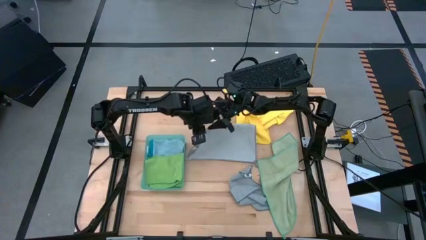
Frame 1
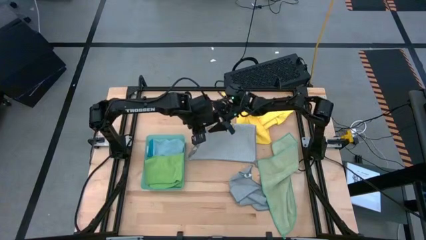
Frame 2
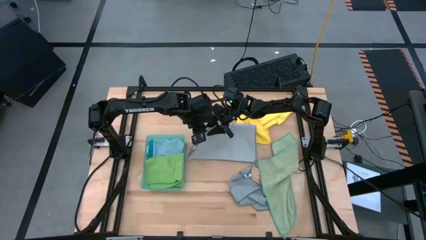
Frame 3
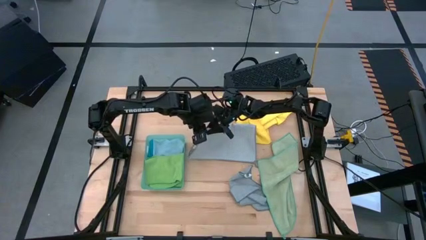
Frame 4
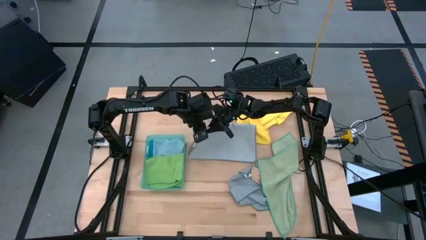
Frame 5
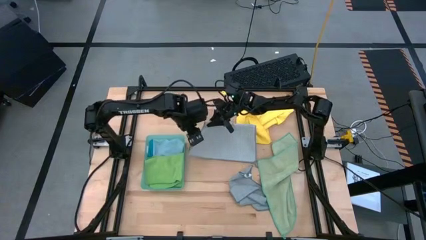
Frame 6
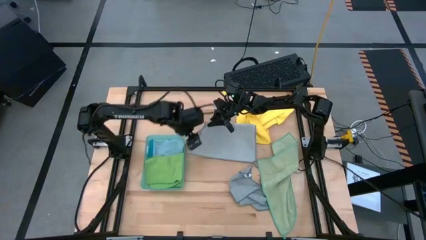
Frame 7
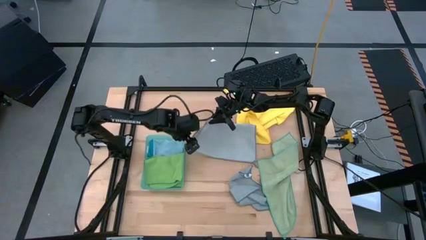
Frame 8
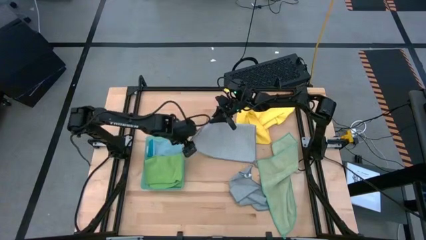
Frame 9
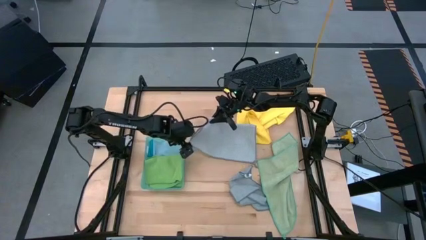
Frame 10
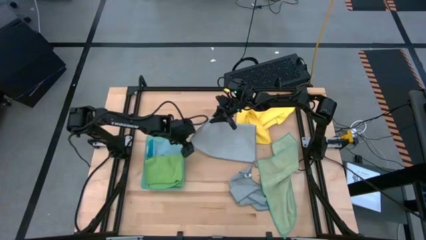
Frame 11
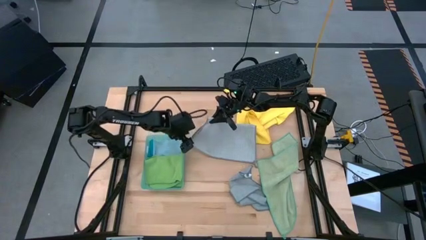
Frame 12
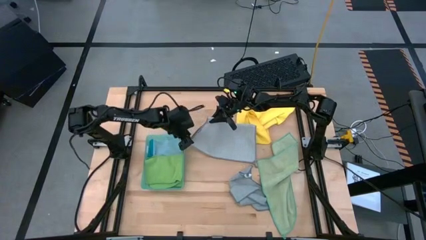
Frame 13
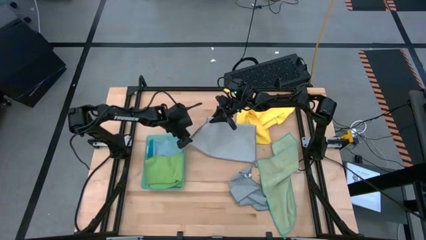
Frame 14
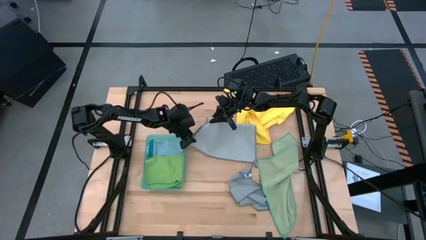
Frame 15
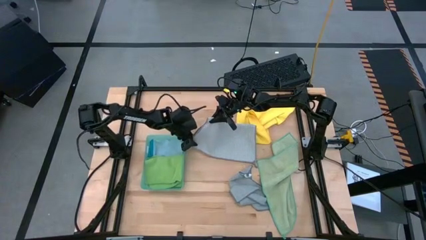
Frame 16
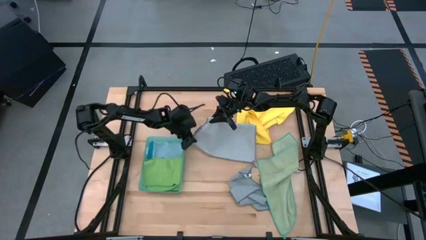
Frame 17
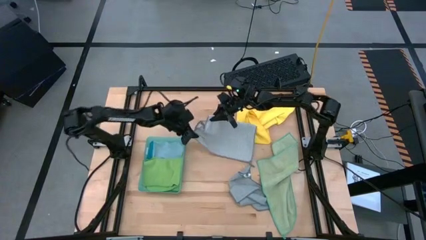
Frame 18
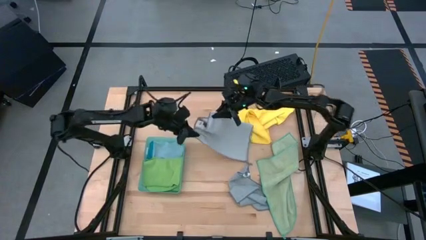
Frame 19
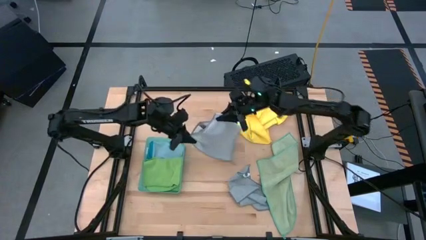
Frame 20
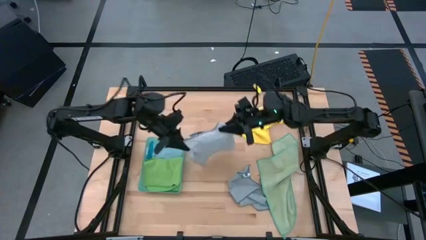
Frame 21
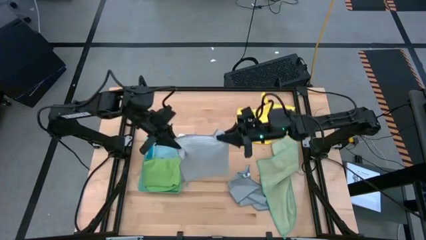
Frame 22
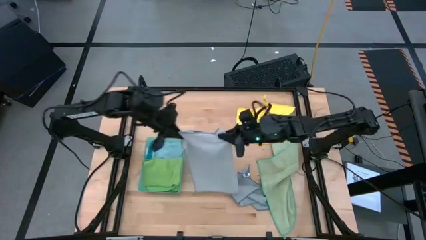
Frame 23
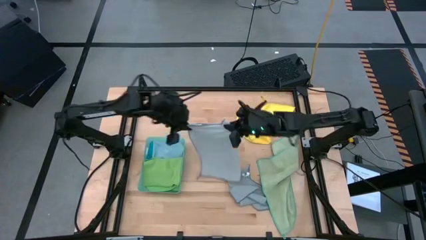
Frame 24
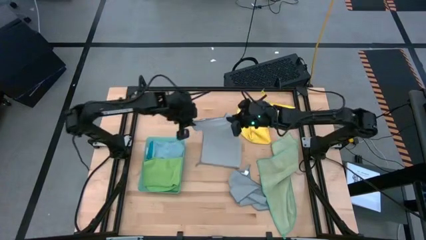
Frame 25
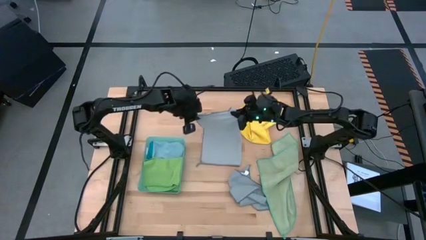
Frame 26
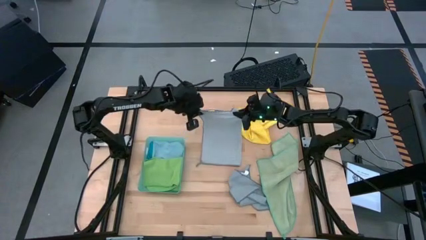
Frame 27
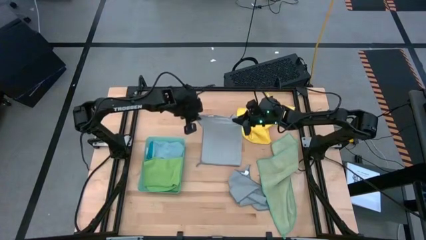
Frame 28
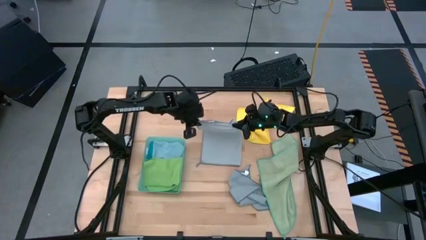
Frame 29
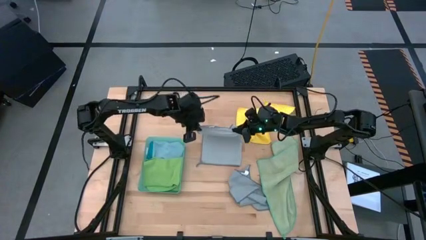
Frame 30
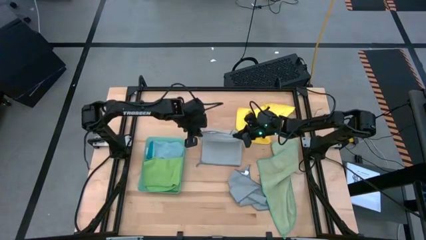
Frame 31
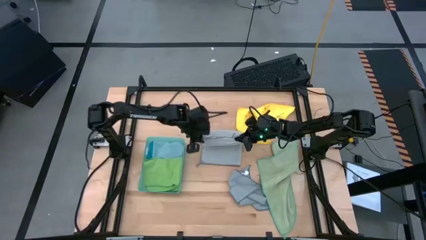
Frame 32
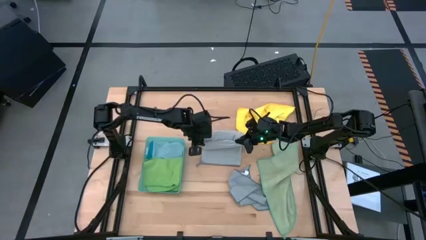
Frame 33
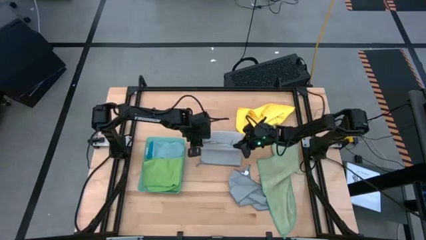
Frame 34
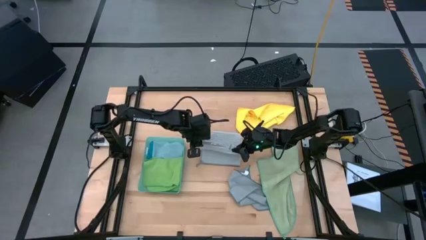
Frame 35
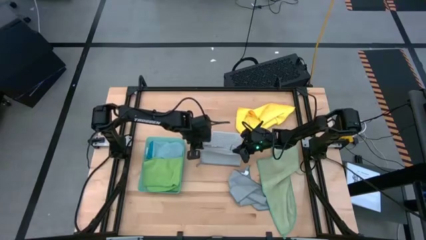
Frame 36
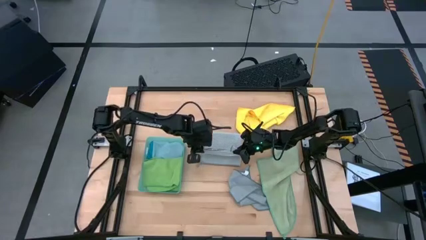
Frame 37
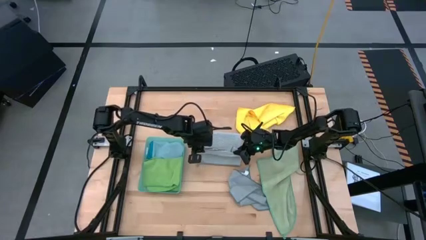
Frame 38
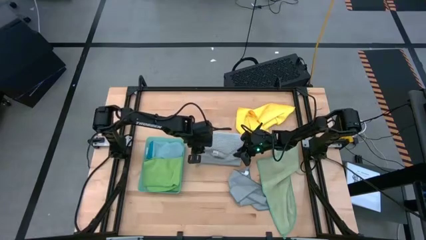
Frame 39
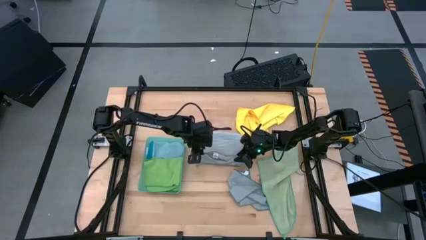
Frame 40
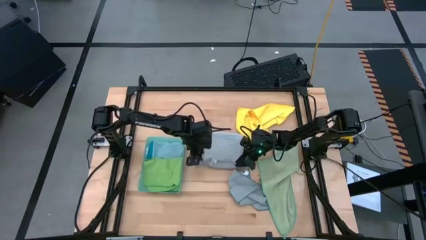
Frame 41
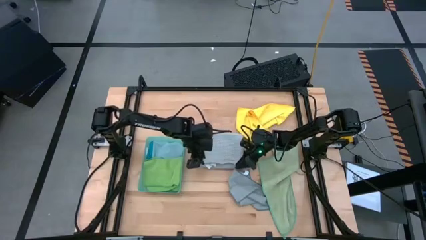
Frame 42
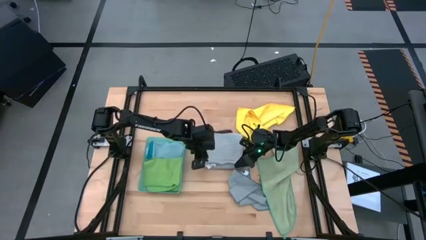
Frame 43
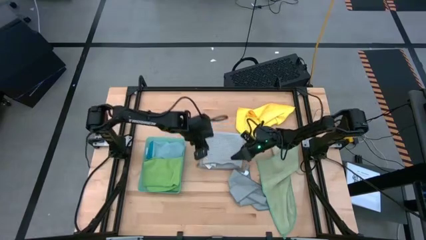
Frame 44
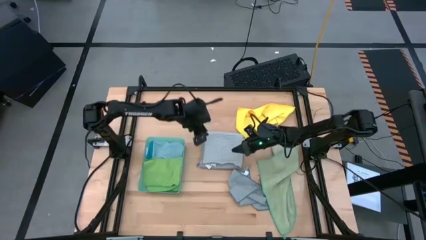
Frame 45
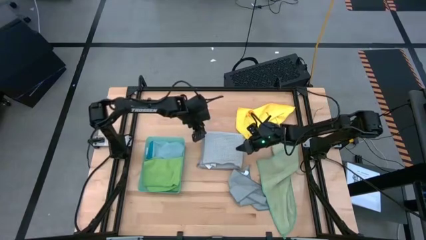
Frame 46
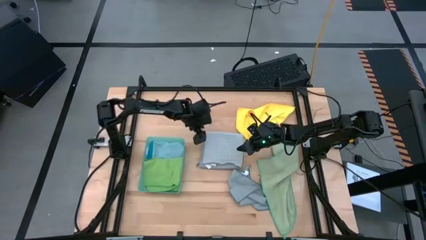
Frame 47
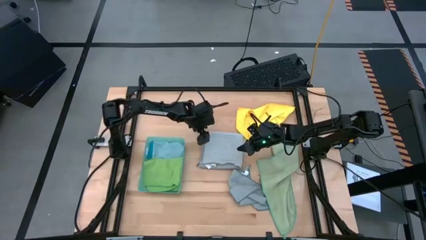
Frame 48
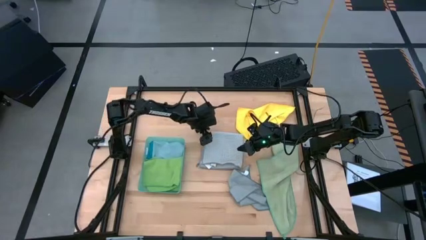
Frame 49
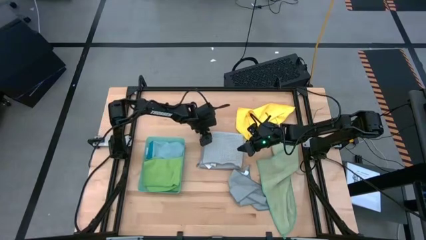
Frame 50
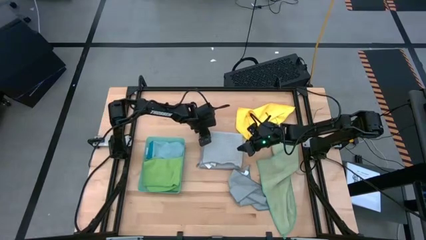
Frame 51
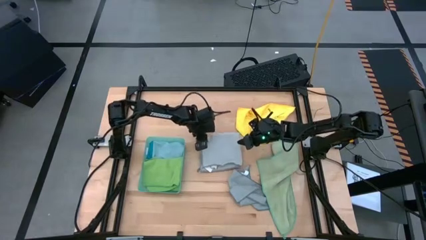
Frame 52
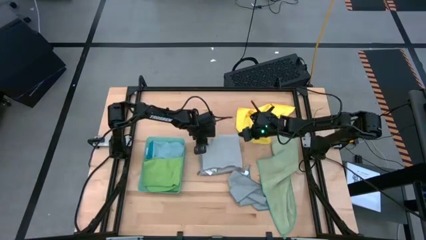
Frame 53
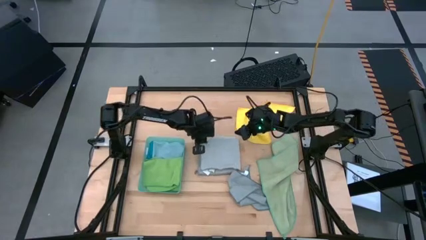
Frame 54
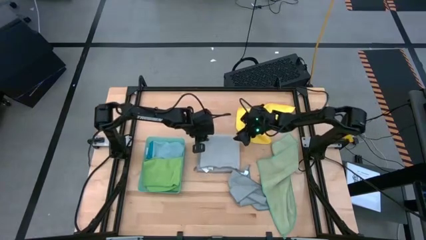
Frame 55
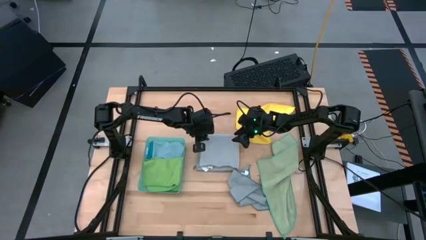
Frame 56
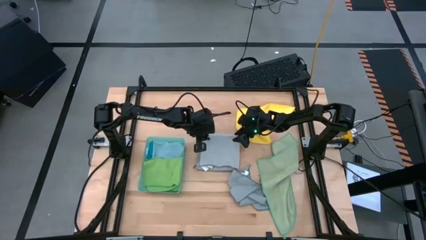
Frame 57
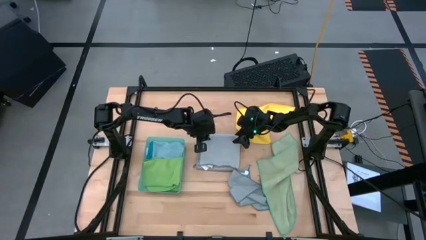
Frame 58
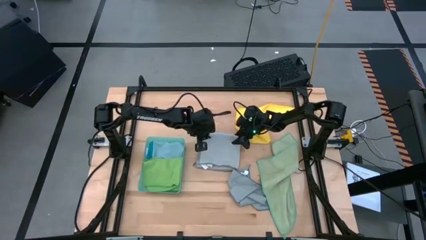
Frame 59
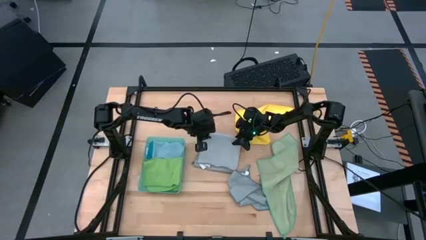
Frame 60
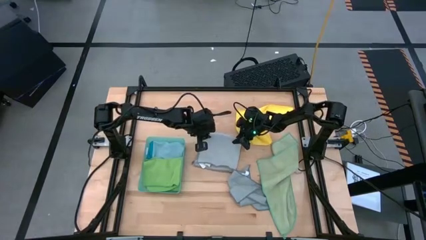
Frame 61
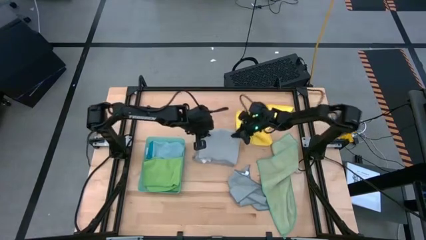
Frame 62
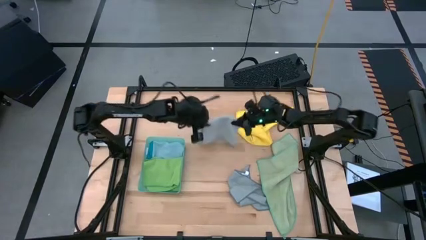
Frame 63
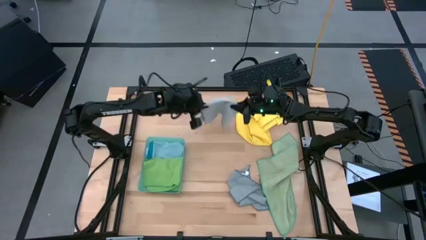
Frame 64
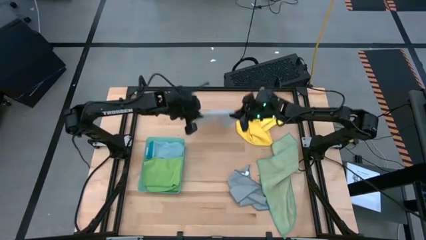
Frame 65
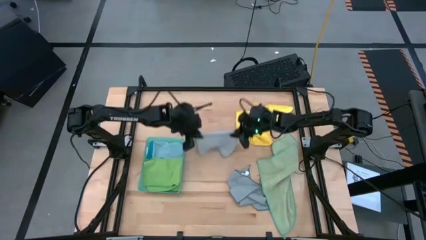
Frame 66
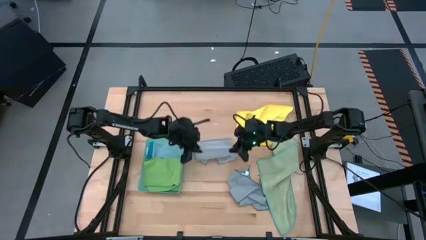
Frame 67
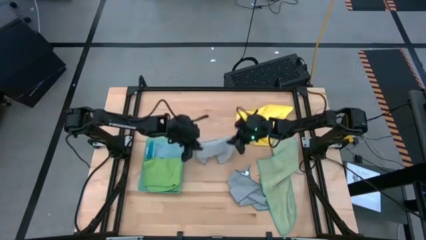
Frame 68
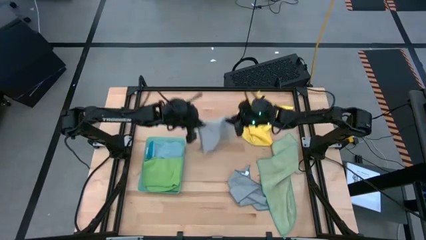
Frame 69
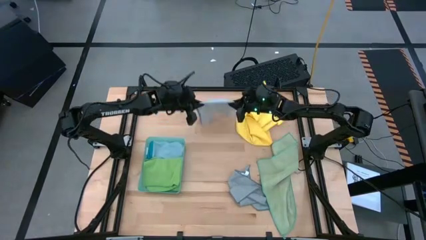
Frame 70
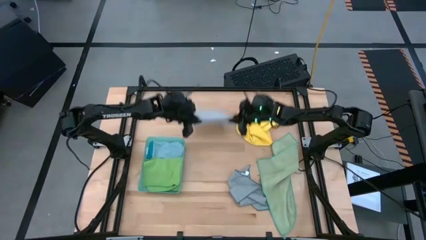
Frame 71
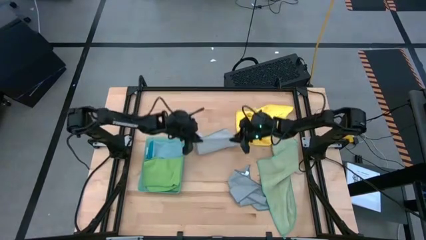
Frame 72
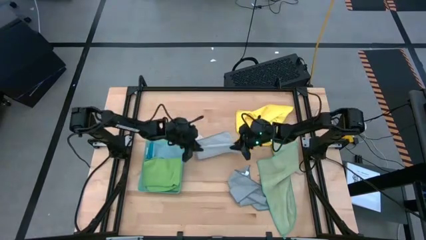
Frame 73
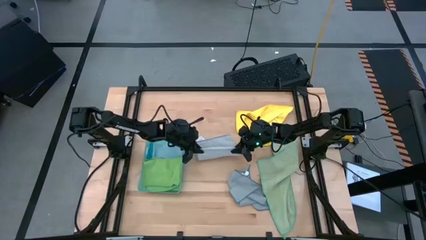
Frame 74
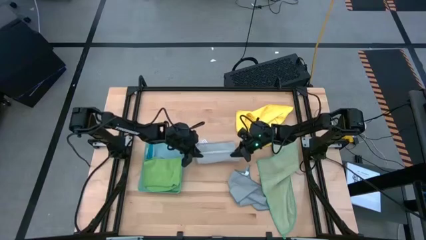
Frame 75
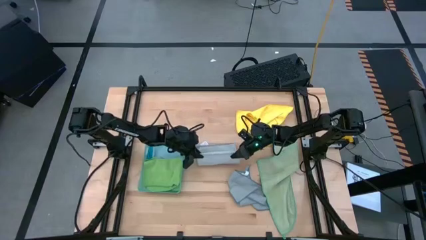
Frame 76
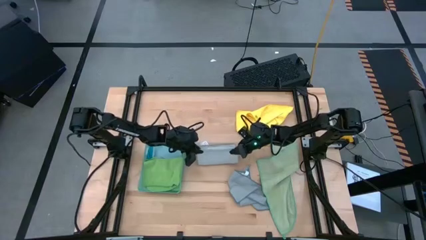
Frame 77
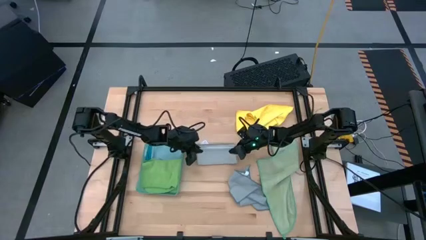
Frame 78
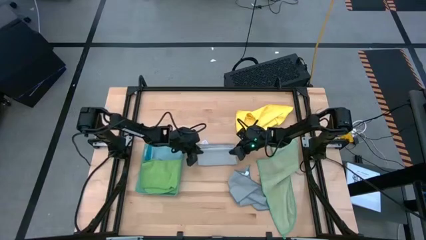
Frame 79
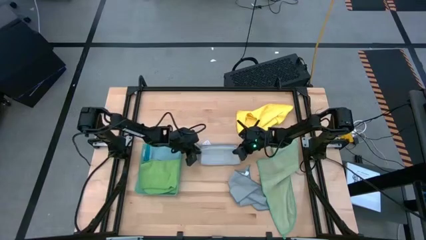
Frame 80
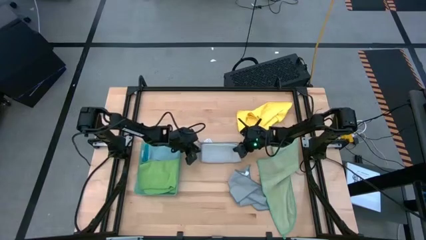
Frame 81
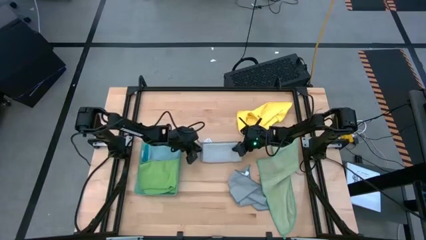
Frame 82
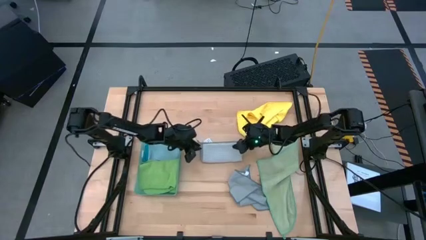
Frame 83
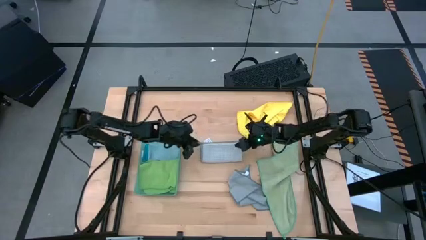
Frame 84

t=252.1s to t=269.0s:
Task: Fold microfiber towels
Fold the top gray microfiber cloth
